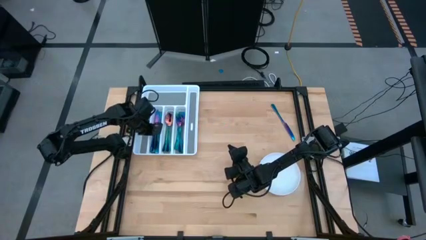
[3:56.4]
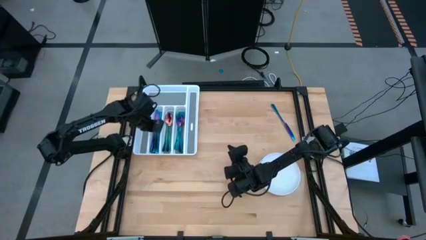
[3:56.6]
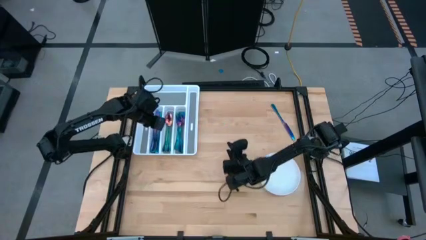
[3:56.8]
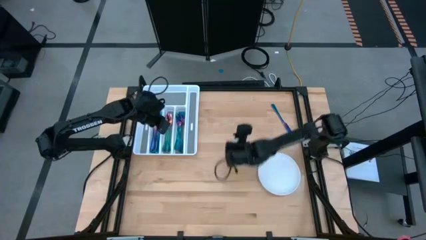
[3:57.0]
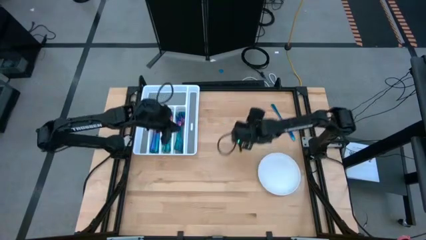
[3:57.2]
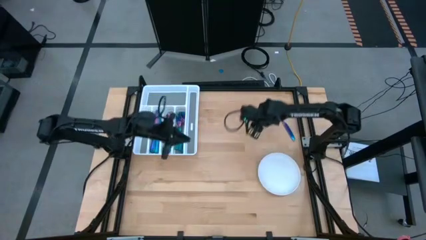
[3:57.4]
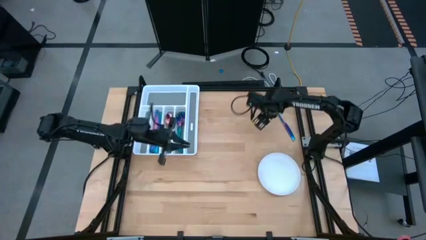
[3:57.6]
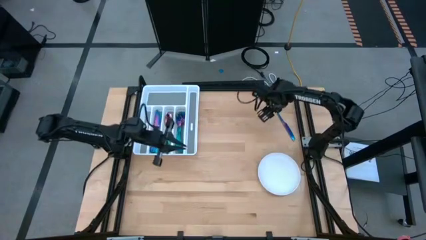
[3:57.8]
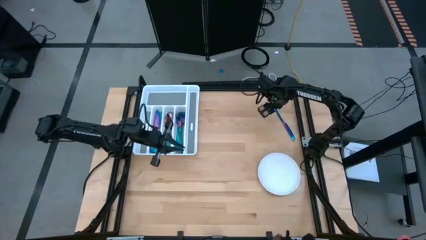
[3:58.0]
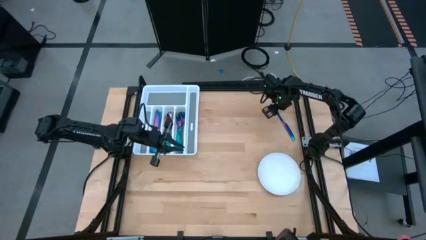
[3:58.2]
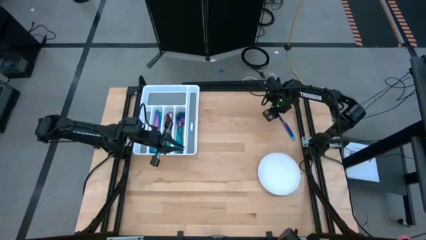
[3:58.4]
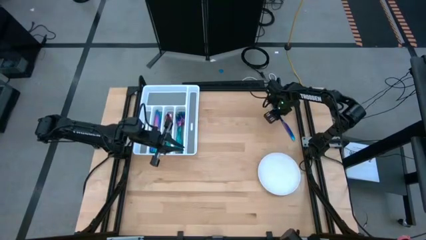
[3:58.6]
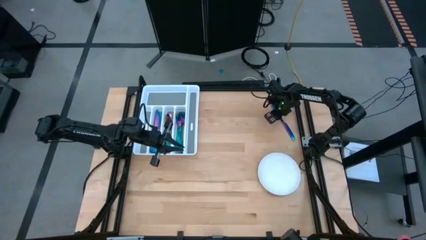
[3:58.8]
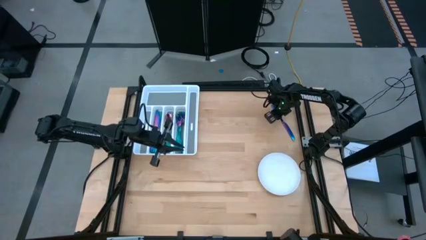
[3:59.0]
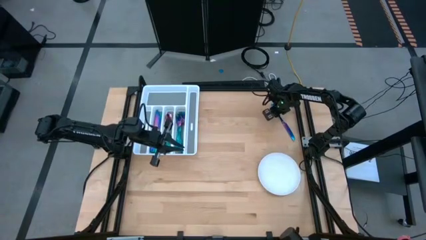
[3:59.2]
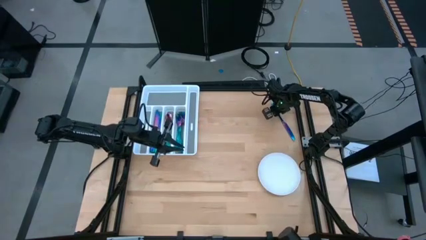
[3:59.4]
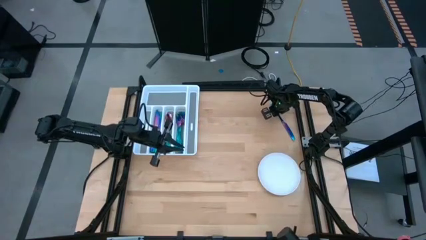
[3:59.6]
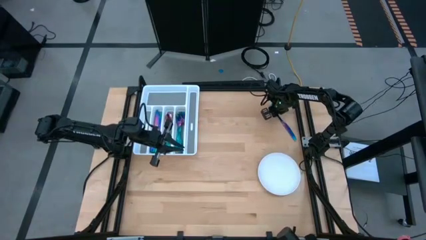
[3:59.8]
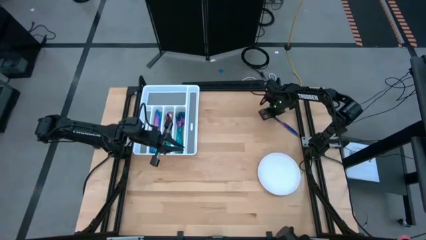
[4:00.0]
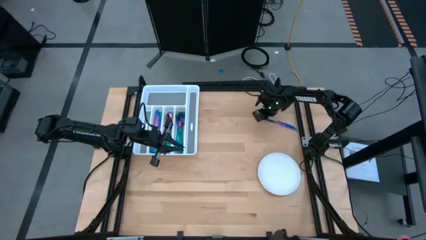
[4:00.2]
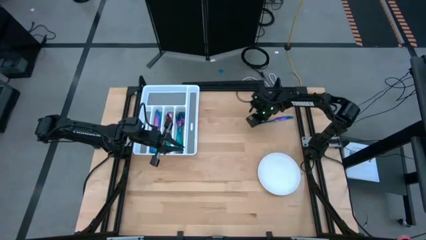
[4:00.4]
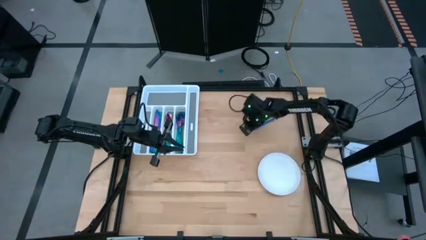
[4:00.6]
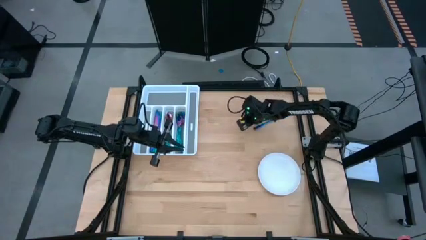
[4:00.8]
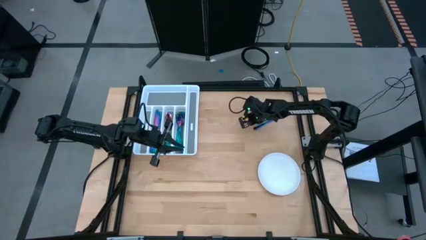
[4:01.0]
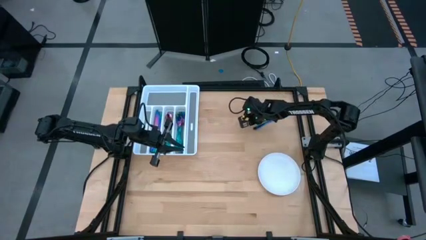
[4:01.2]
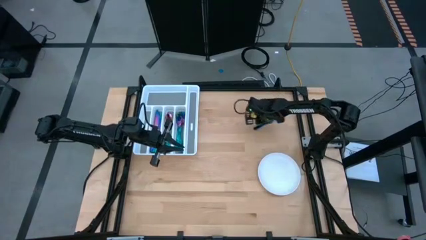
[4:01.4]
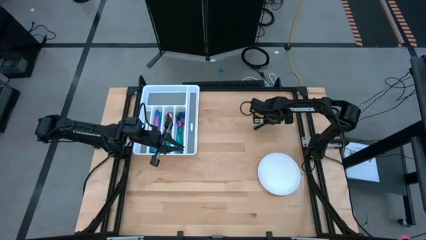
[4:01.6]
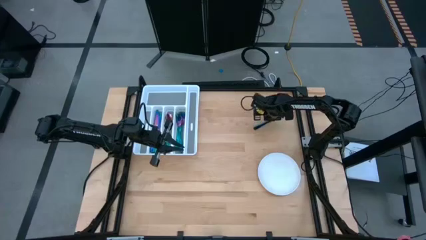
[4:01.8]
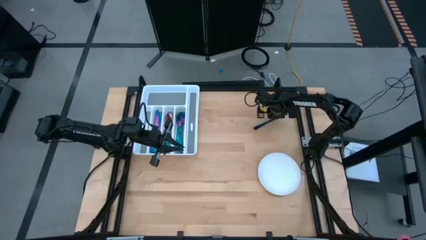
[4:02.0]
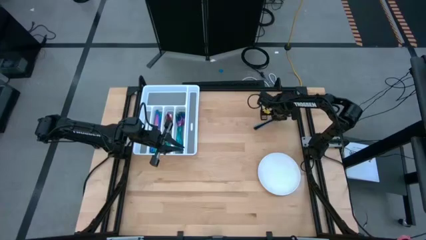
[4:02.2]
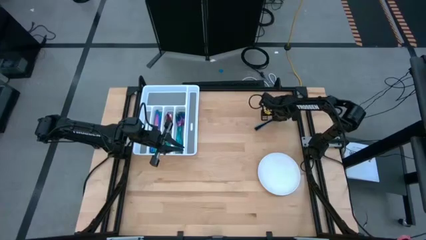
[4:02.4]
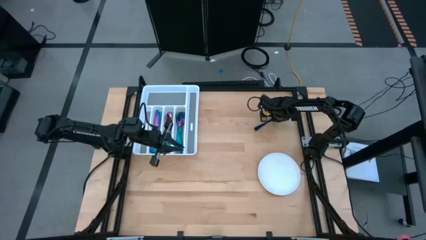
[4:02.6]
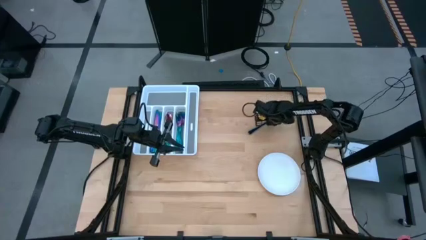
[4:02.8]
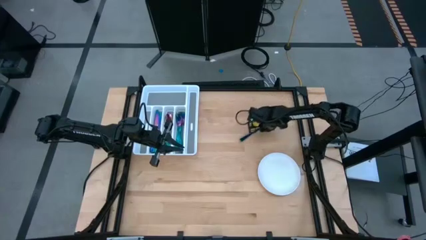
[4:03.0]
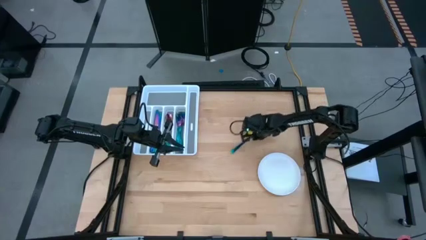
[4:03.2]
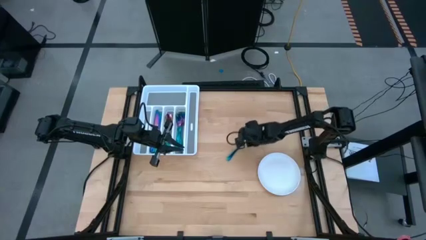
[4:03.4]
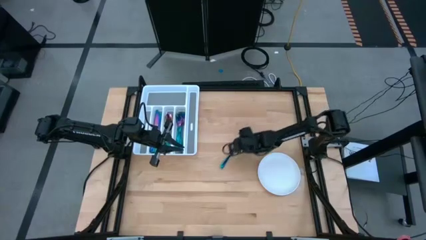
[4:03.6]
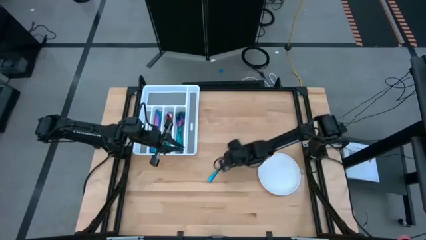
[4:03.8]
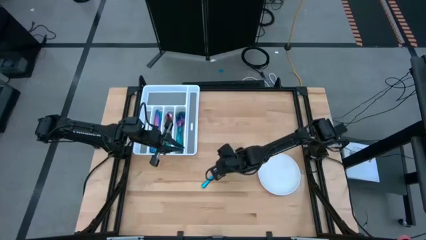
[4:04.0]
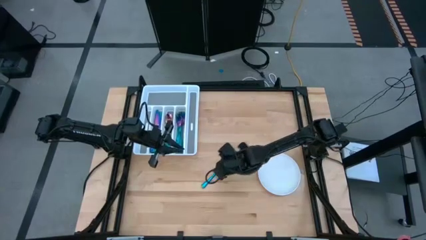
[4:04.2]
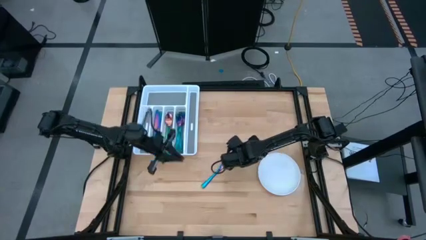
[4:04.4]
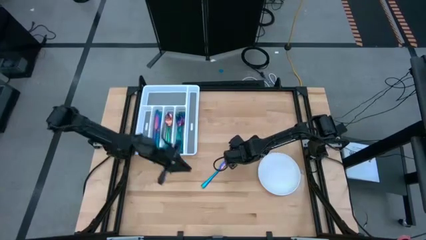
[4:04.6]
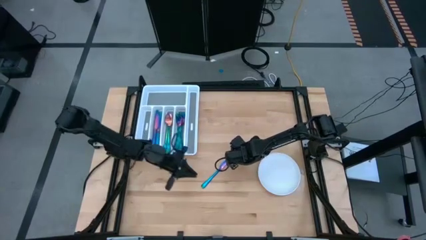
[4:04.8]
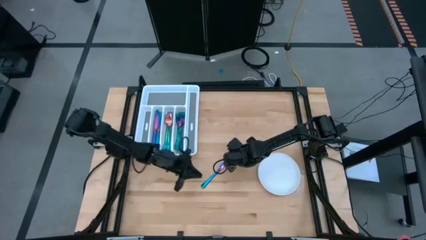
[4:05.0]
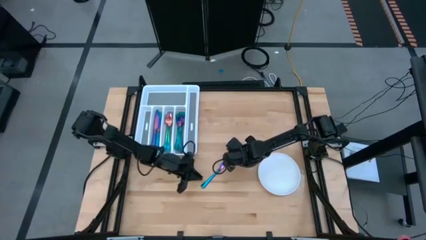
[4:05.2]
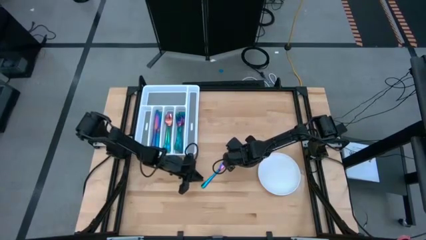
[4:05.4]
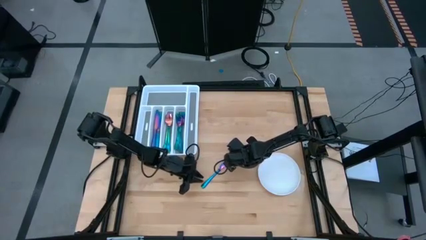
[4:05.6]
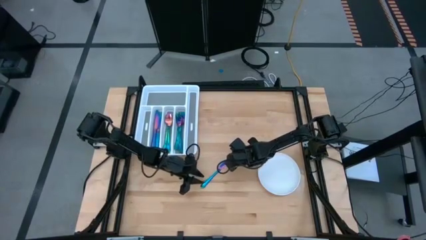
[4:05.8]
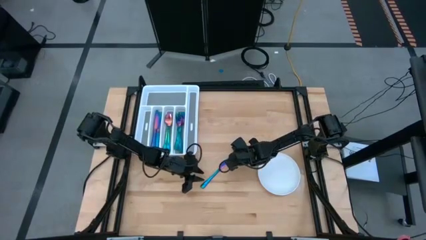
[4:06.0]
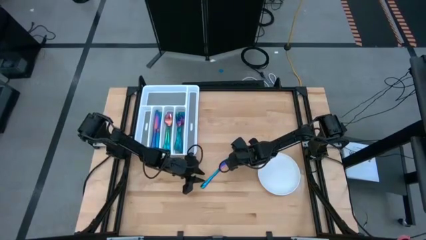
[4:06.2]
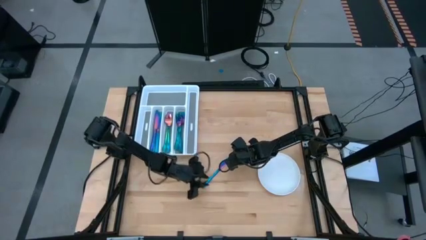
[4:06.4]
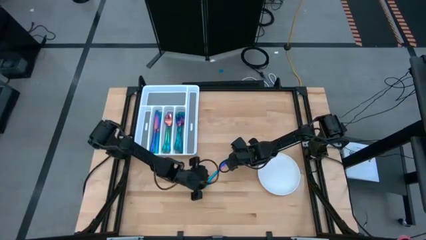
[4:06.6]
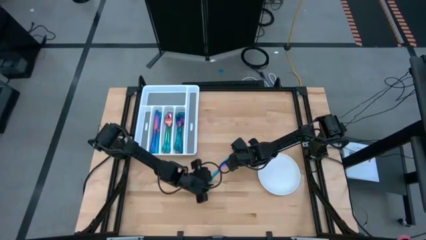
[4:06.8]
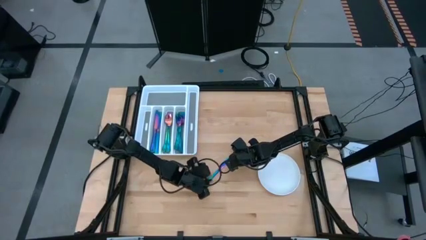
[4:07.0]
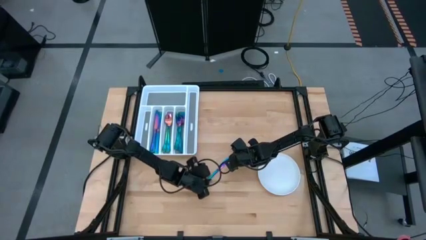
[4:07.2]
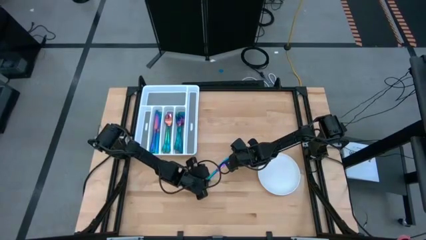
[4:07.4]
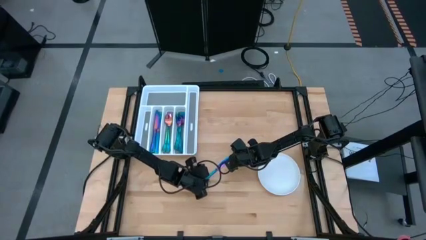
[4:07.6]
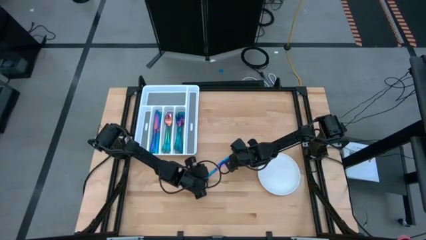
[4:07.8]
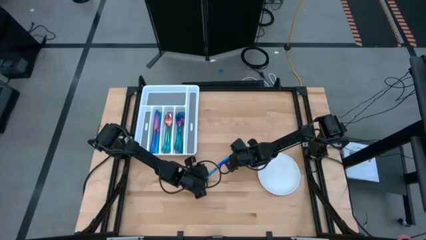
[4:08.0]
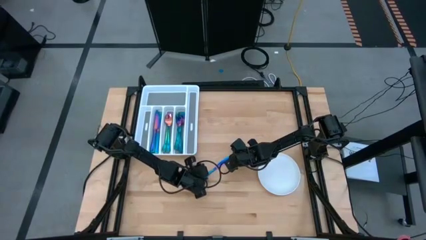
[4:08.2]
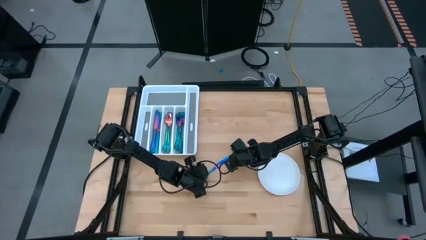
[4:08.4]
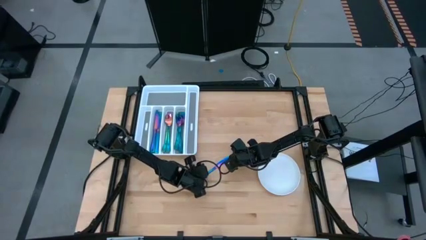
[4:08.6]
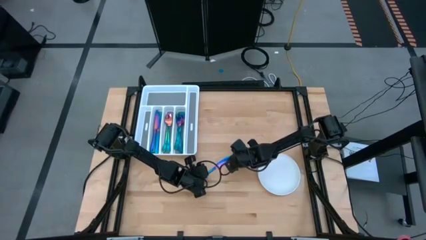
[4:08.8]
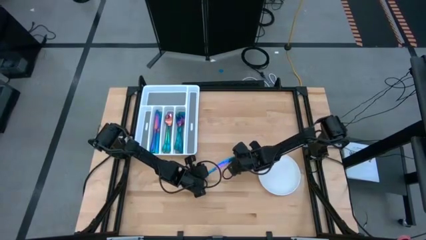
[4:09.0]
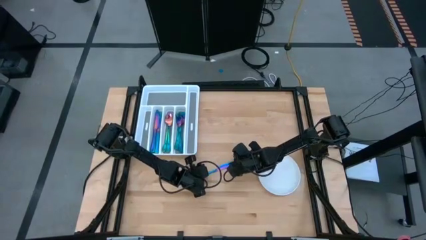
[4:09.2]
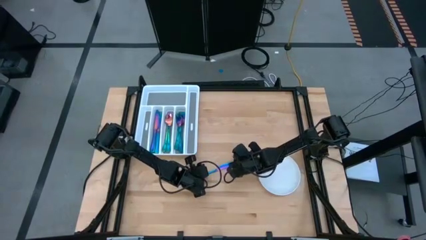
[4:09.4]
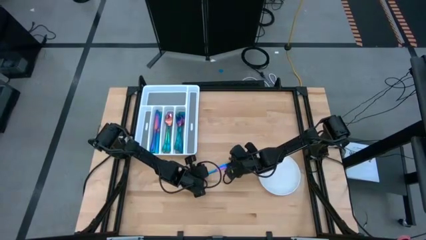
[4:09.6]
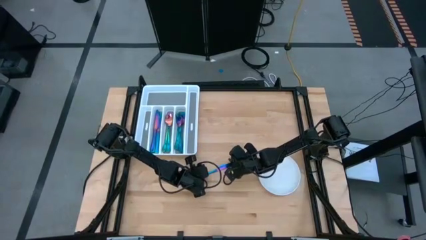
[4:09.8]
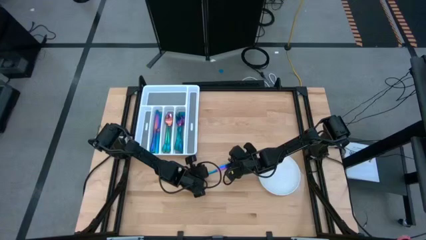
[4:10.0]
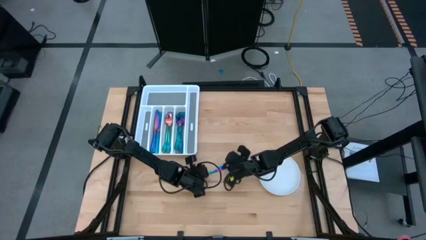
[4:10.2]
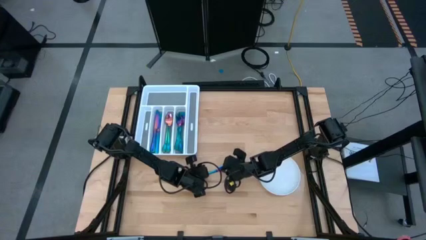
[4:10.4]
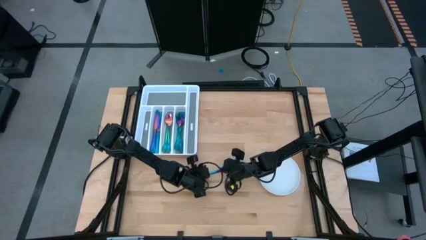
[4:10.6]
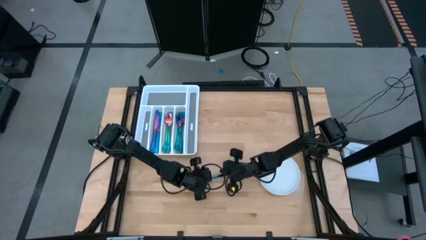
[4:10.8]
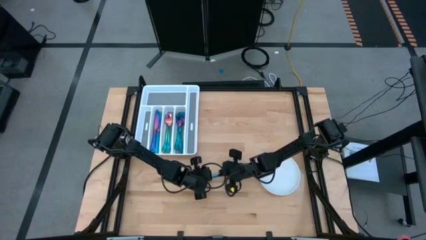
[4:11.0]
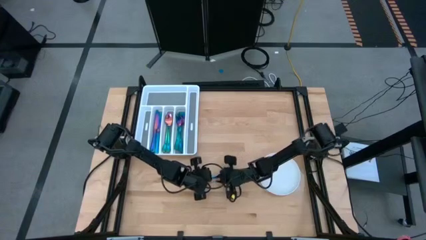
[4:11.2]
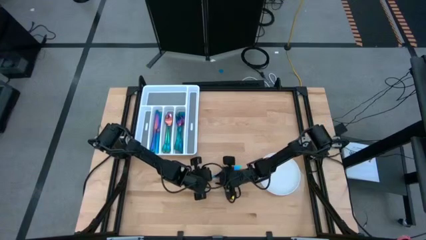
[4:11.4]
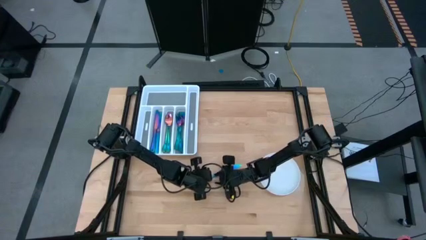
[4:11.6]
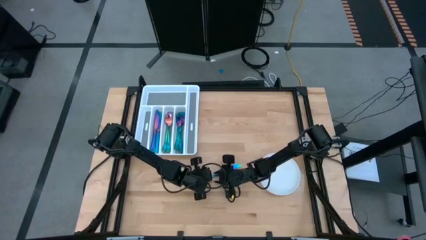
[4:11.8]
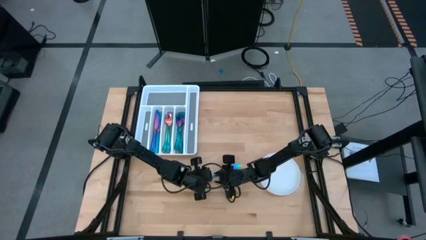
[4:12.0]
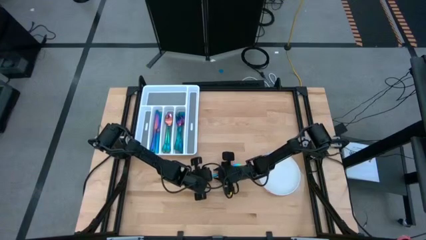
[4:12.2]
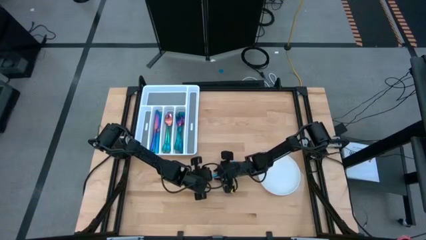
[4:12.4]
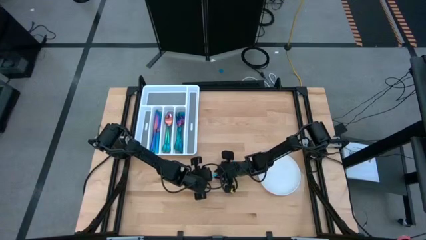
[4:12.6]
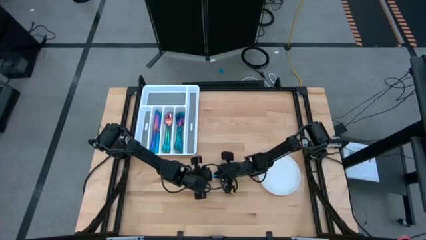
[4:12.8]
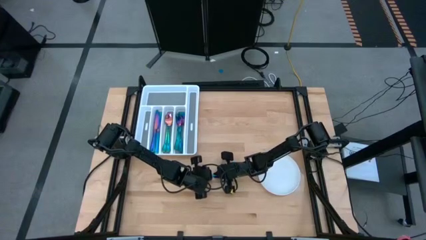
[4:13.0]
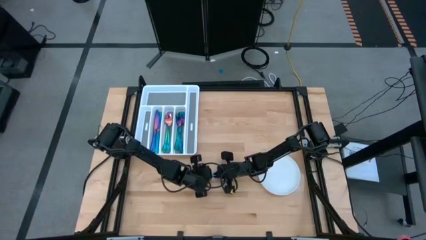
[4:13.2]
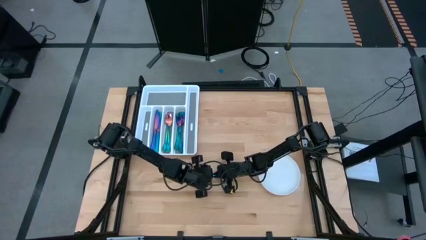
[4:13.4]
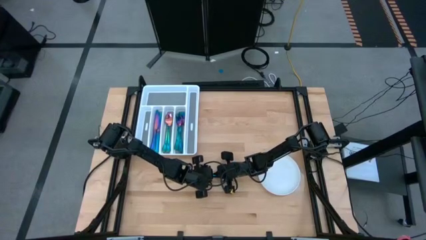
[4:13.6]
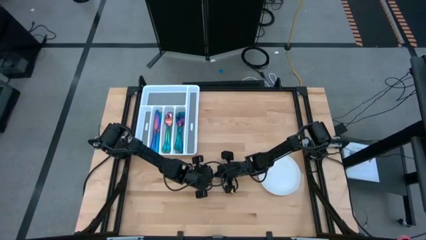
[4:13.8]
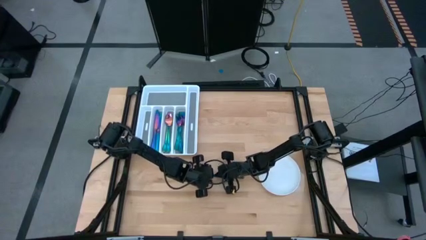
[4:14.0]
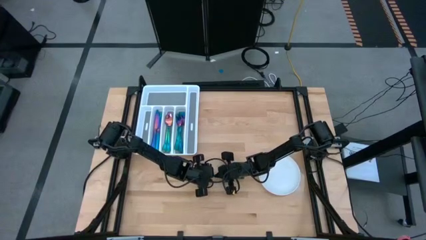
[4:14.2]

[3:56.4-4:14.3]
Task: Sort silverware
Put the iridescent knife into the white silverware tray
